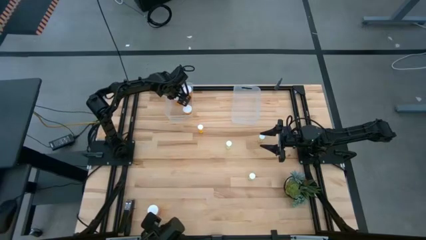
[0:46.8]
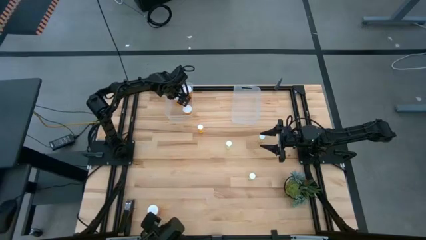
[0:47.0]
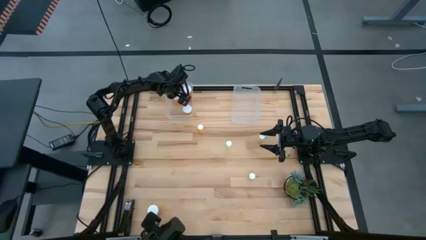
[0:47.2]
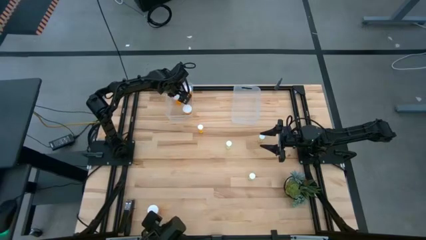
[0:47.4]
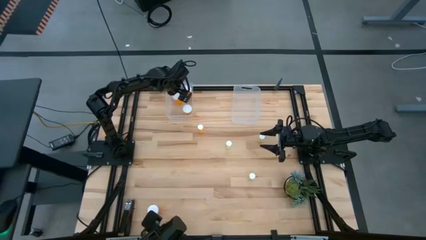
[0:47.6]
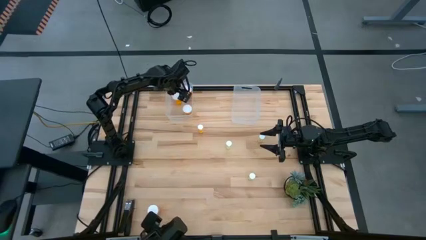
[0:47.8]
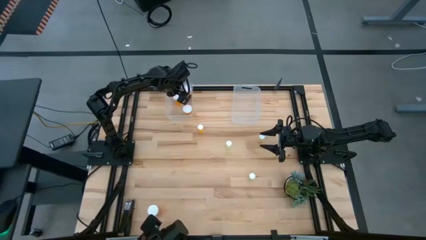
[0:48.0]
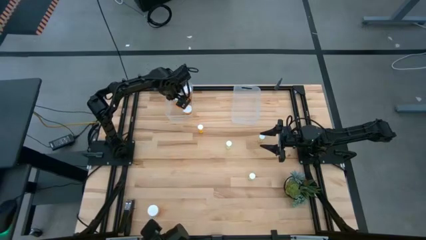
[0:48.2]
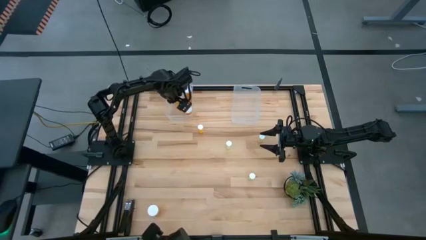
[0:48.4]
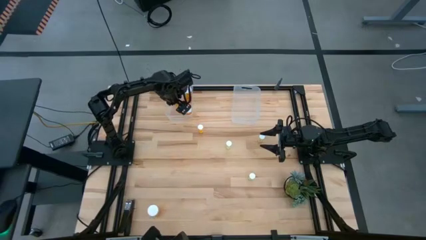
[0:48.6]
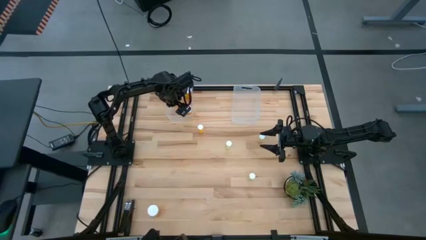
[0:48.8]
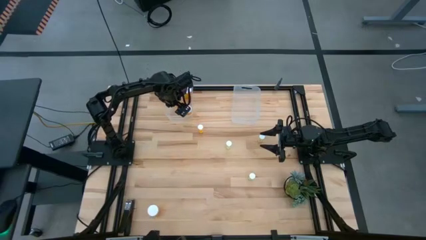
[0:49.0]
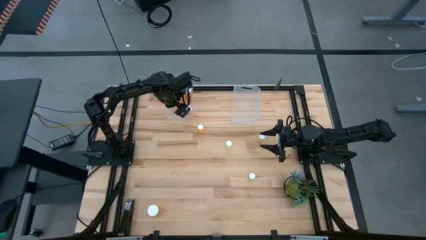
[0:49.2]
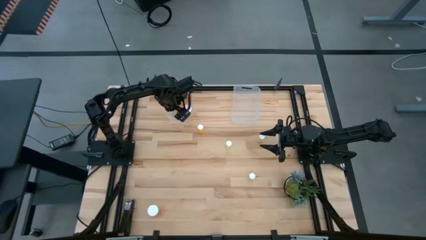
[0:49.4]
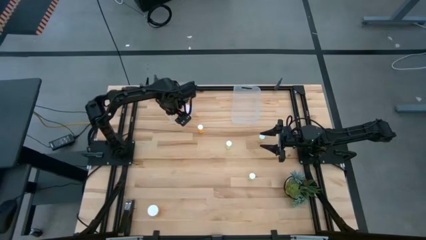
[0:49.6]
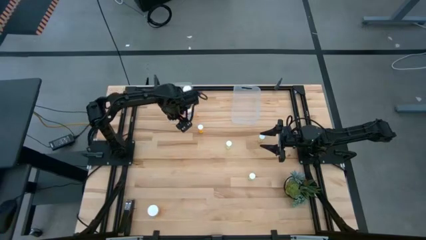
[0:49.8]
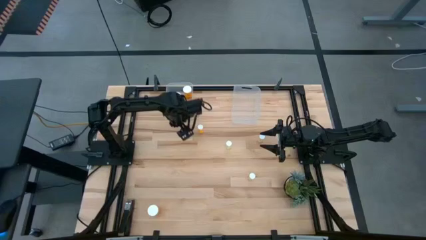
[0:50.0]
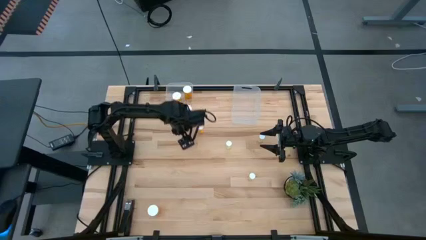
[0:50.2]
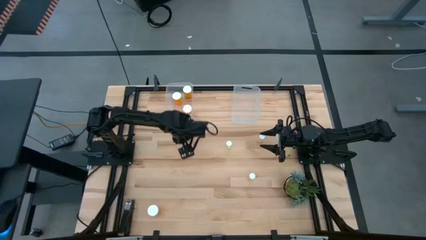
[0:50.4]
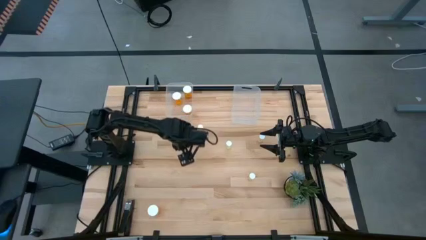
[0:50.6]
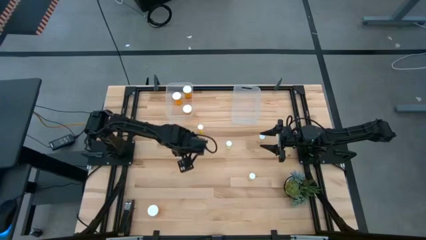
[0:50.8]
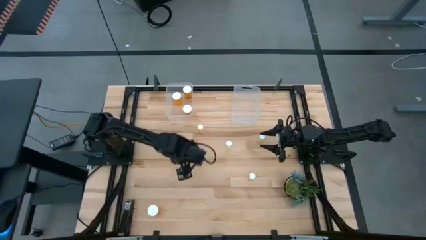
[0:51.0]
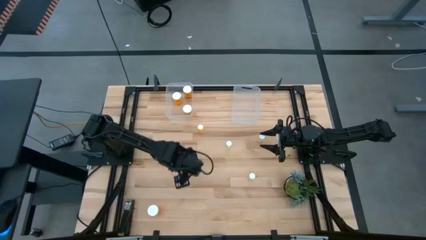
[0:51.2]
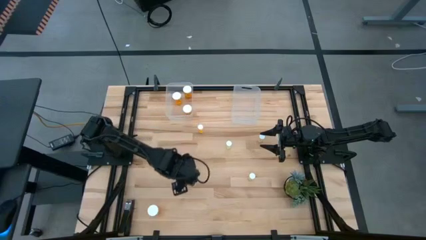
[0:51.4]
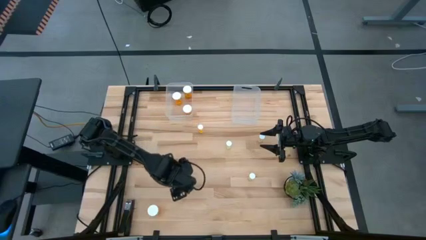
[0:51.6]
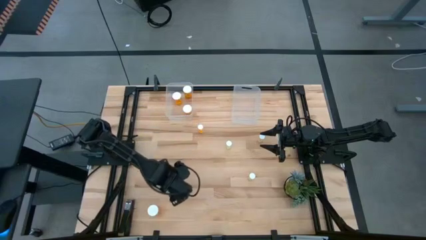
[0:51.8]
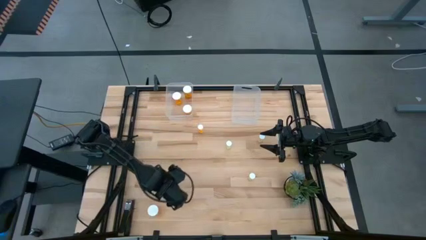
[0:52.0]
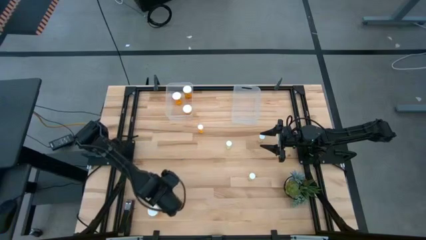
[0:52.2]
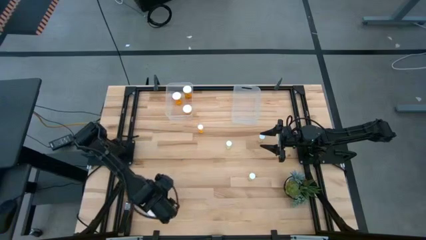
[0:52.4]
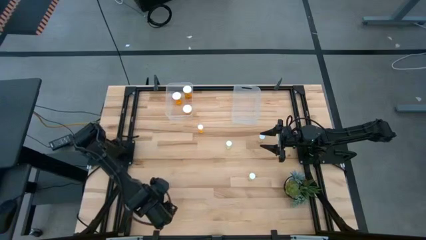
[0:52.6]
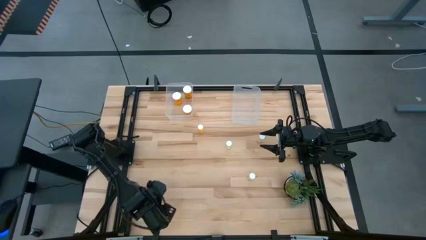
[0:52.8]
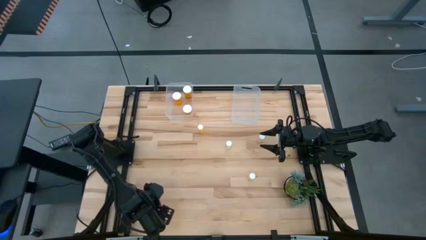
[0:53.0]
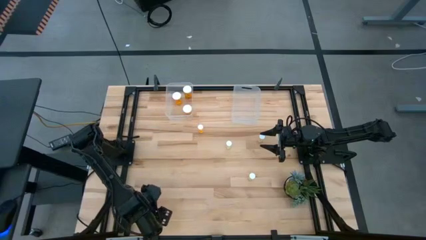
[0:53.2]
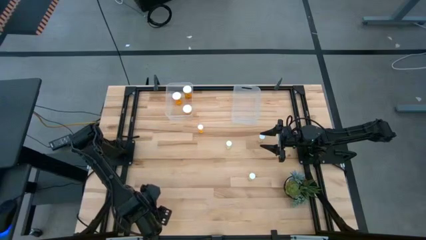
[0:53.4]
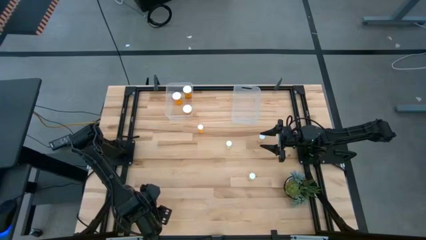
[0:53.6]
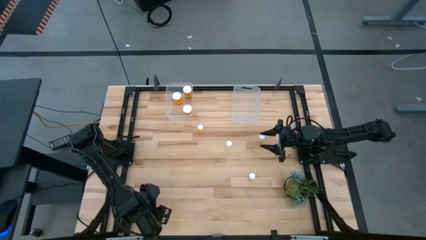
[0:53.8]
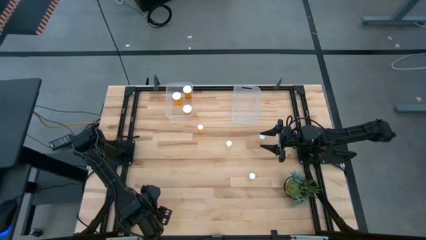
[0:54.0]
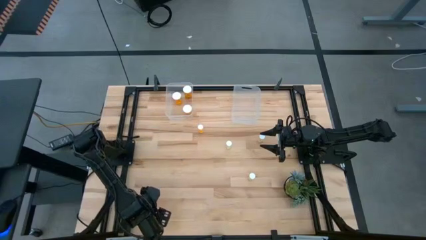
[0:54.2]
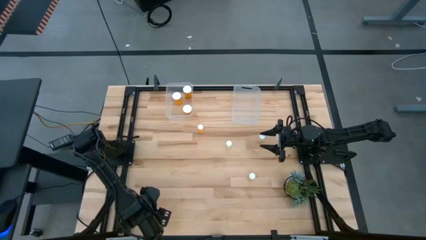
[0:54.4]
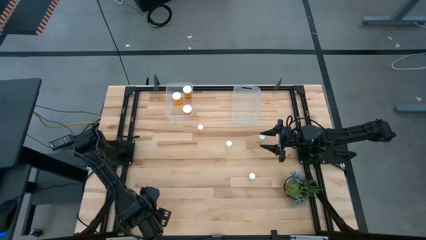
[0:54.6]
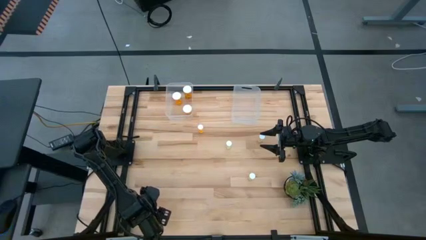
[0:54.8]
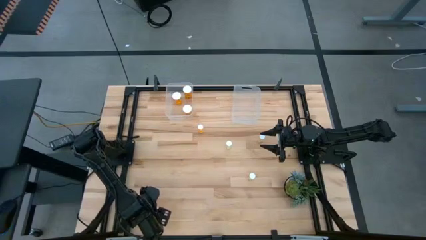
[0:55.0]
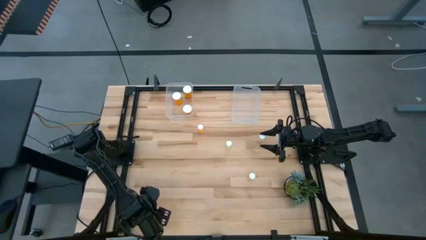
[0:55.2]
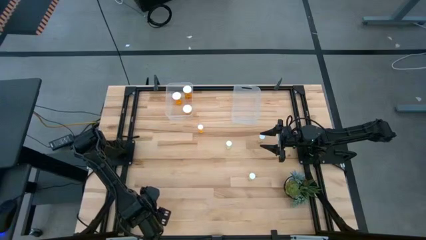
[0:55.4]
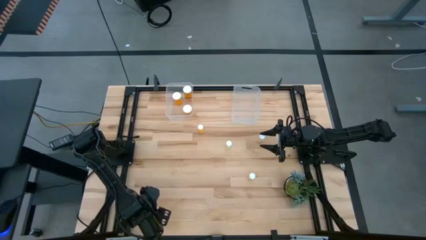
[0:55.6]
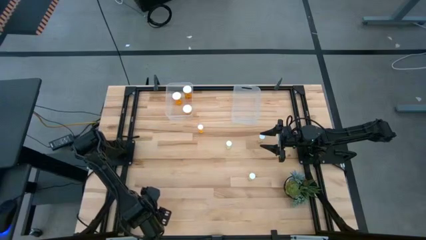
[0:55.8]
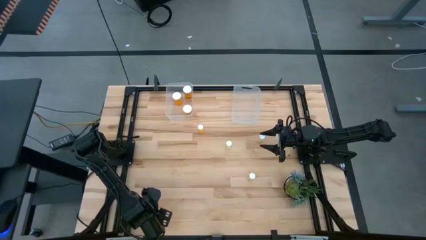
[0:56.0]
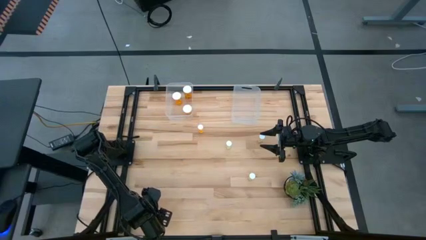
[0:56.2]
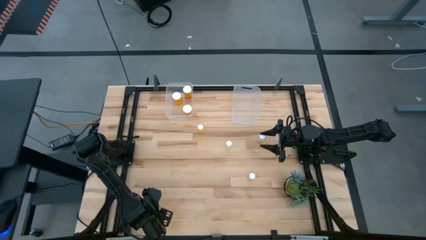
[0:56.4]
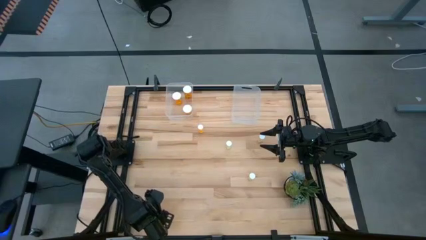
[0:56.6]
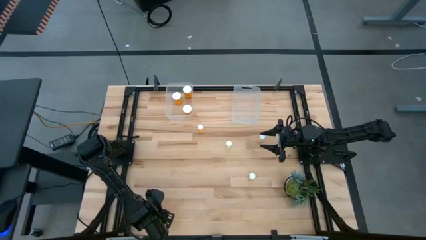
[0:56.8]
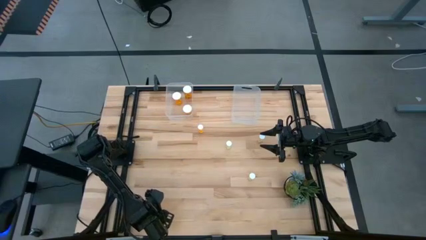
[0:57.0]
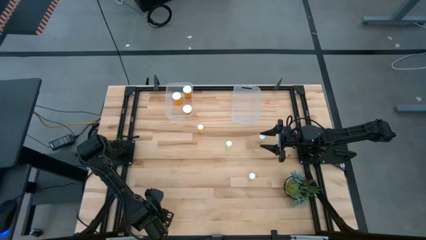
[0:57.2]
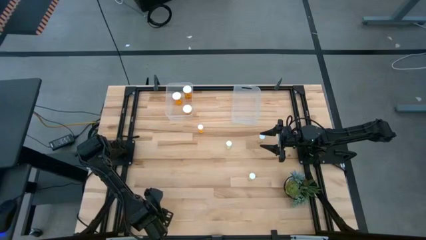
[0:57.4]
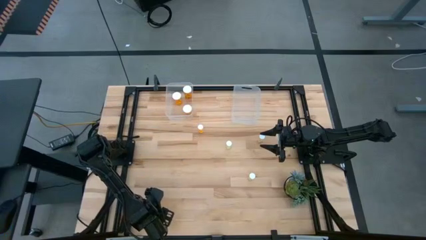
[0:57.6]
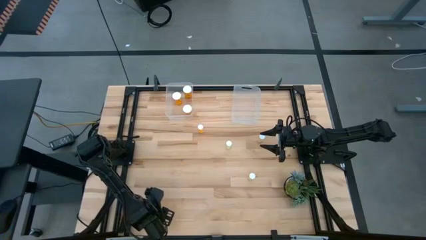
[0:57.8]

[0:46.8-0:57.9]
Task: Pick and place medicine bottles into bin by pill shape (circle, oval)
Put the large orange pill bottle into the left transparent bin

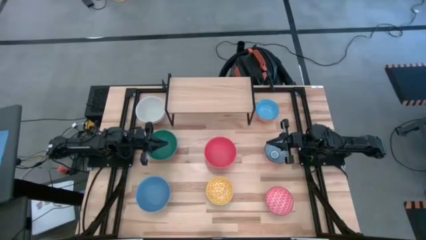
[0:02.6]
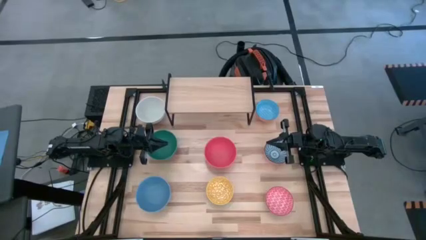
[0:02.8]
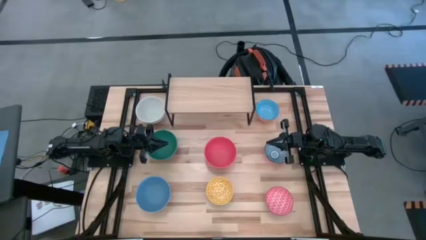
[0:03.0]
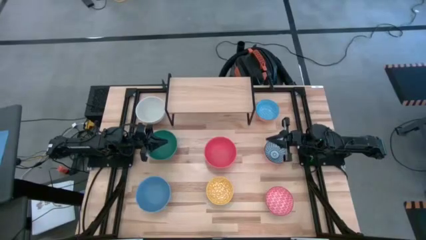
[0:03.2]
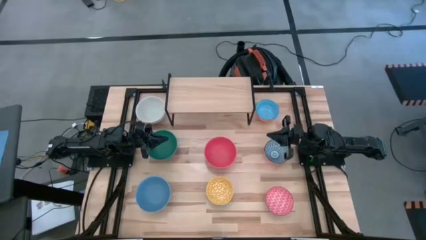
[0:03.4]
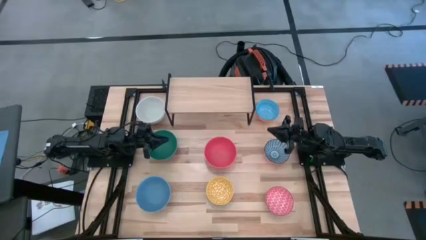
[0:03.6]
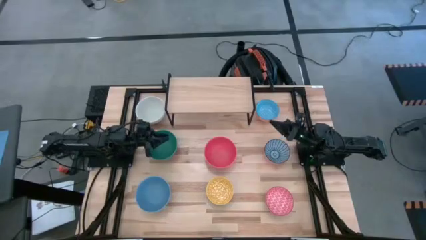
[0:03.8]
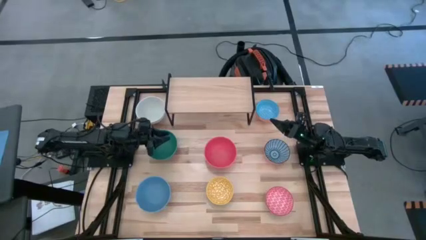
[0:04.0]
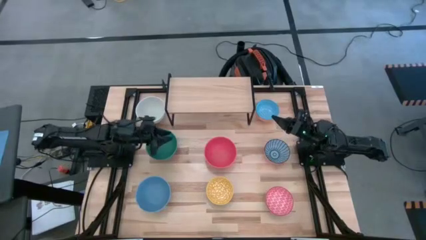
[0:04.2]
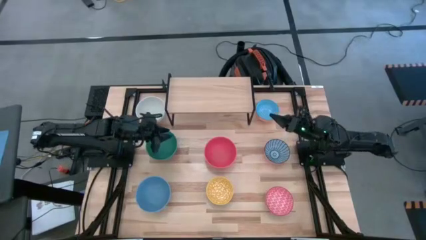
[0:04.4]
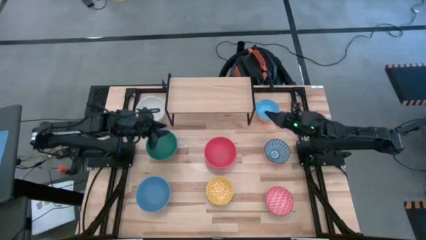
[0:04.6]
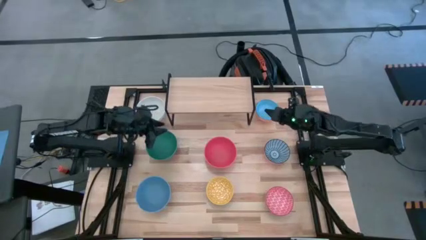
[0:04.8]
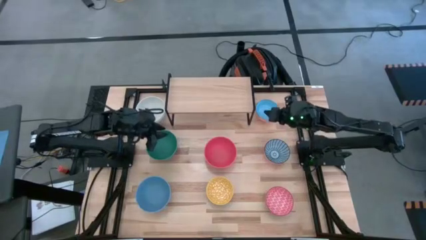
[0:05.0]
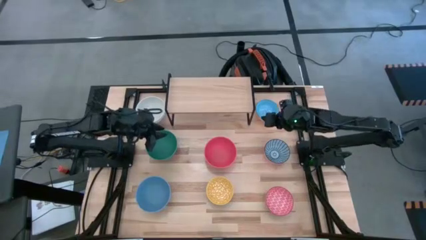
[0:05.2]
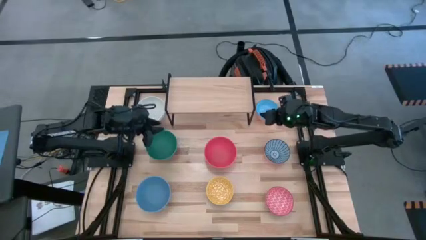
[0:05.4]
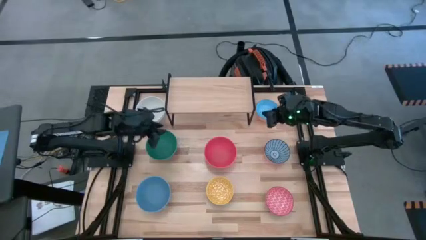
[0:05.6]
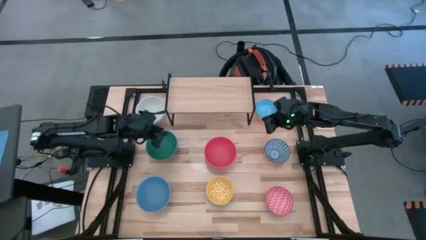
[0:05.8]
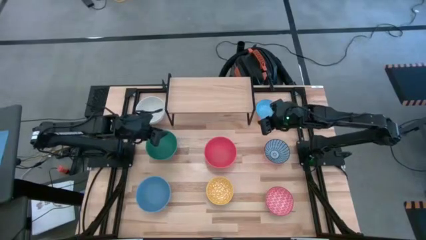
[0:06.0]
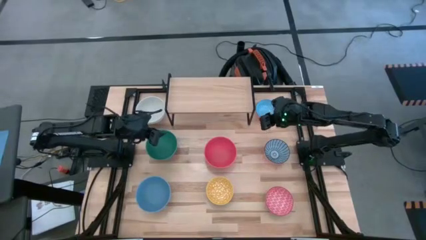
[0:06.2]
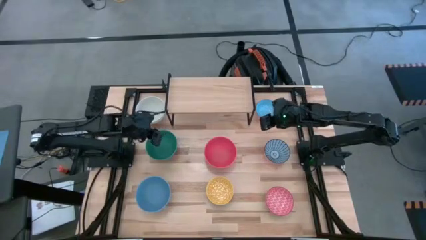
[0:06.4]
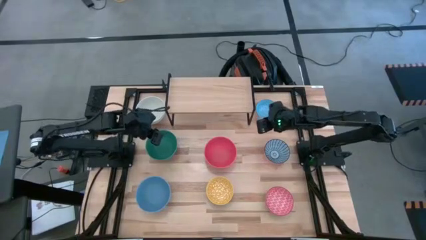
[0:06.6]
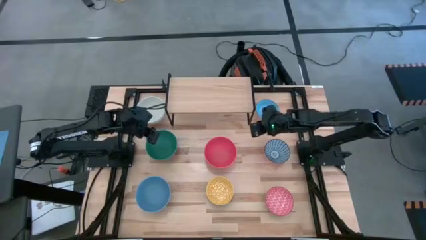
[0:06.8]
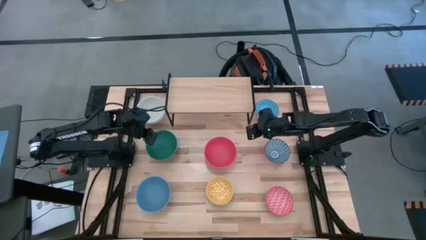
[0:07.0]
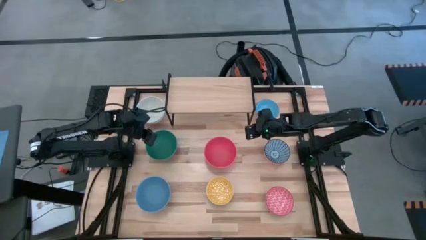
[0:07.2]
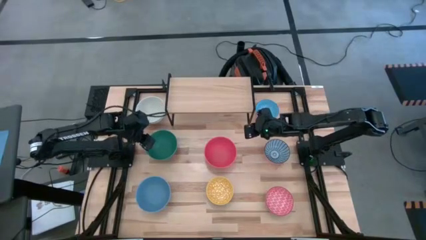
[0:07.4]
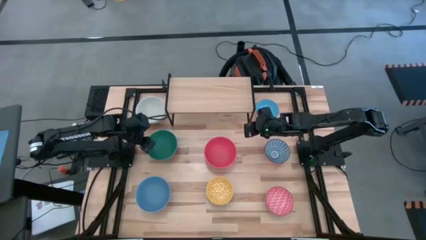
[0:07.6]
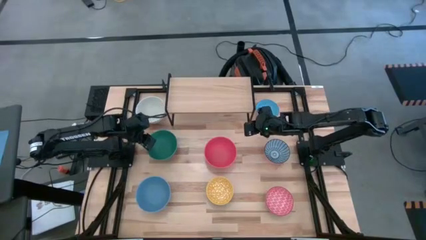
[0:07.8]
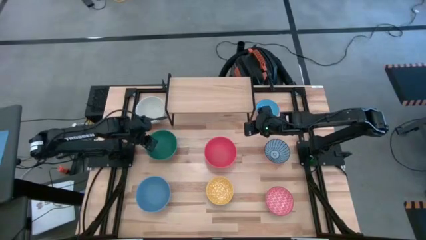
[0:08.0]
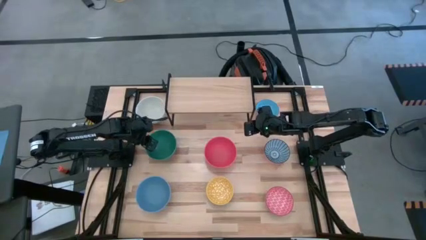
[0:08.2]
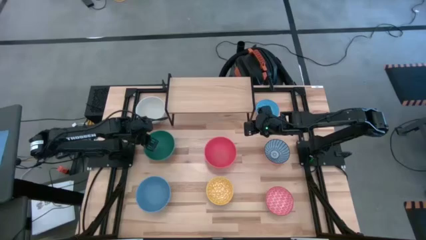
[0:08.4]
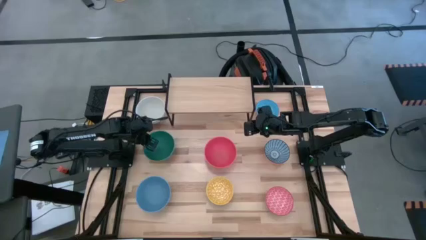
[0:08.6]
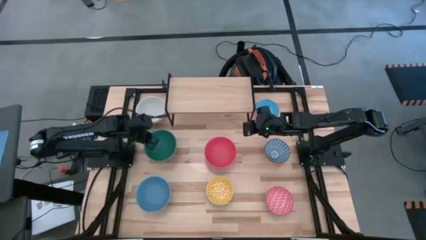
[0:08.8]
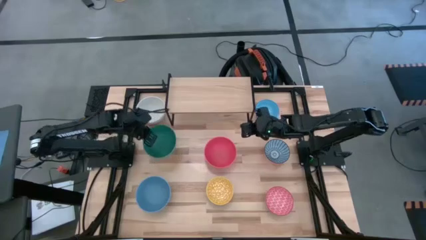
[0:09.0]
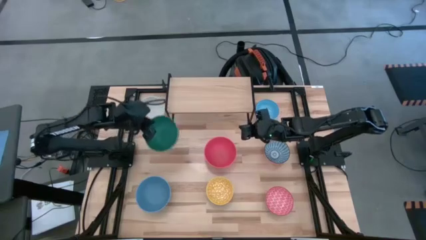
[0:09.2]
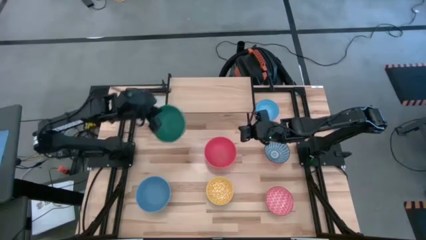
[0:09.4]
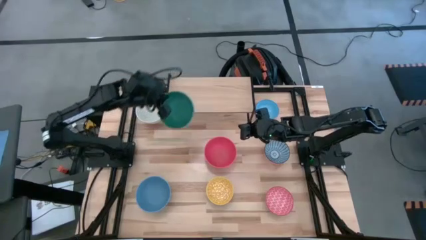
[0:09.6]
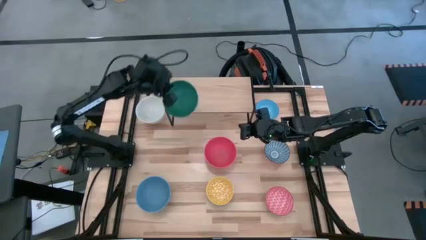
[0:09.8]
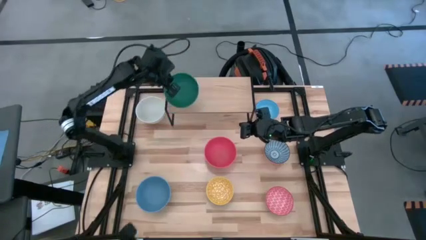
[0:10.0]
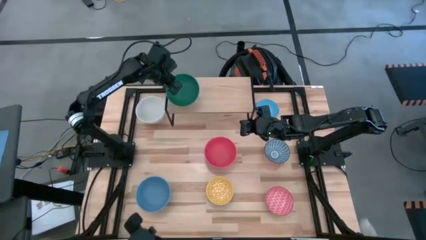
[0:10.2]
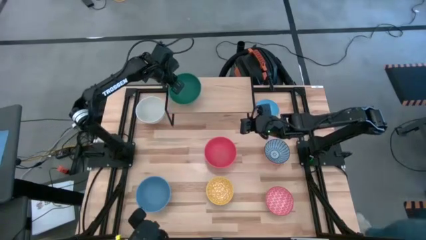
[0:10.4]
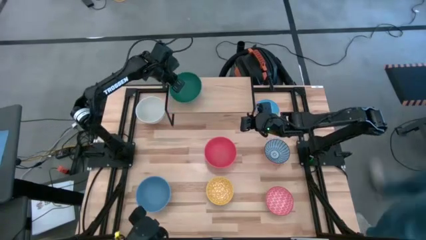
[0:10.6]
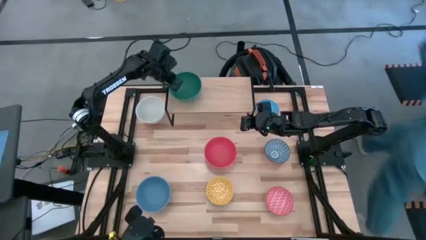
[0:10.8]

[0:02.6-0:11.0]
Task: Place and stack bowls onto a shelf
Put the green bowl to the left on the shelf
